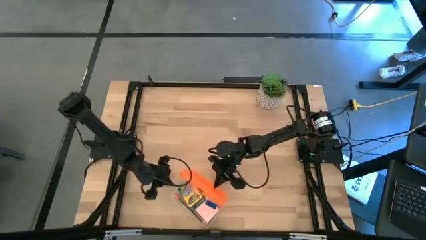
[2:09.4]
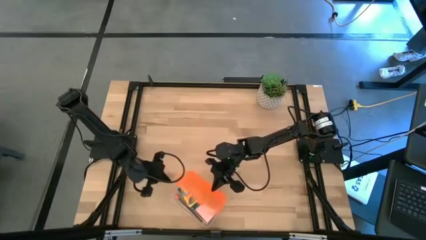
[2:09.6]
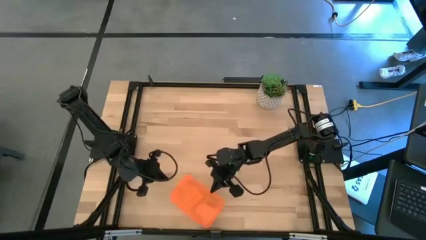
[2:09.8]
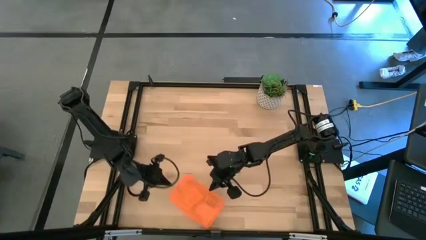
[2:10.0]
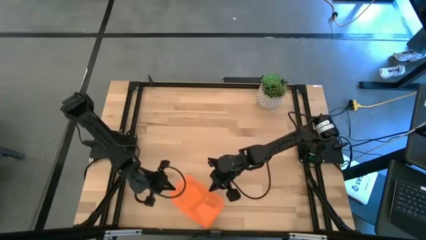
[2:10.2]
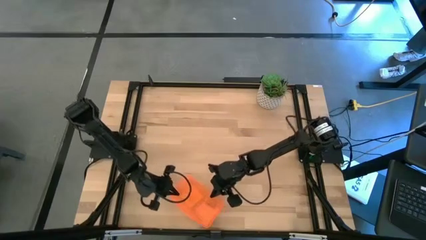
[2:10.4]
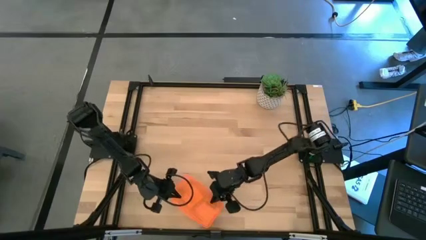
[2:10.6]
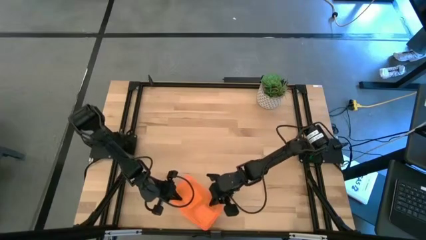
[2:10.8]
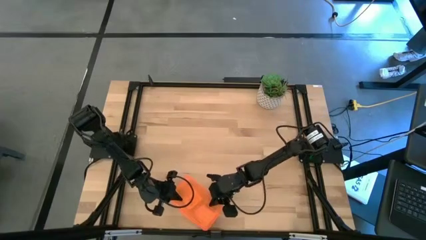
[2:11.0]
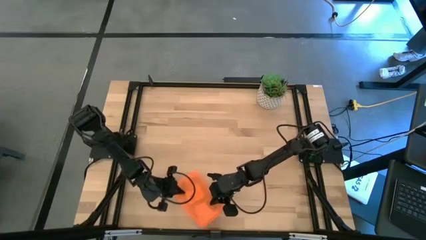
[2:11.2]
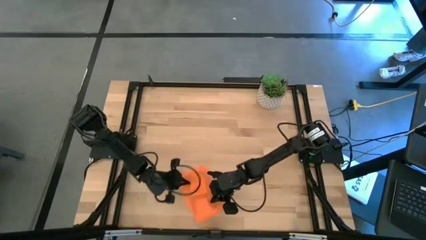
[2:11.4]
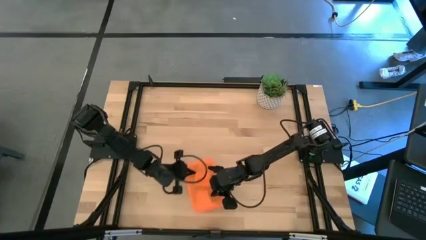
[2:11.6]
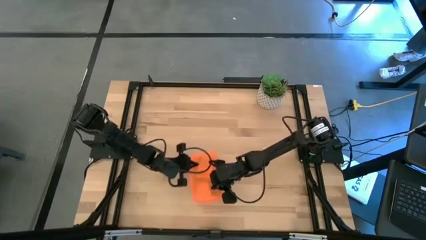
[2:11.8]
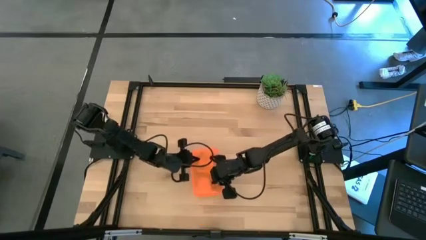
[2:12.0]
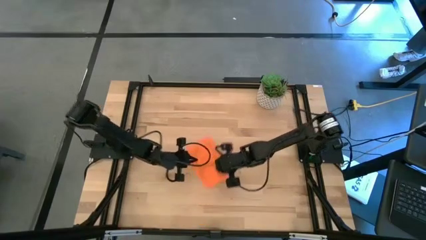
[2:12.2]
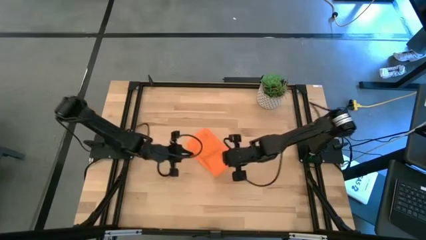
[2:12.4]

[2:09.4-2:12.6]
Task: Pack school essentials
Move the supply box to the center

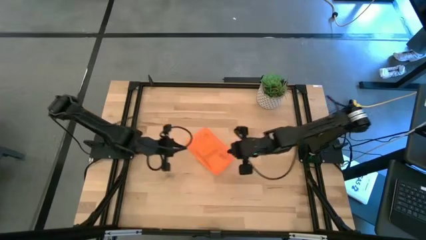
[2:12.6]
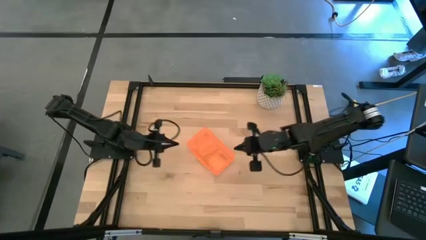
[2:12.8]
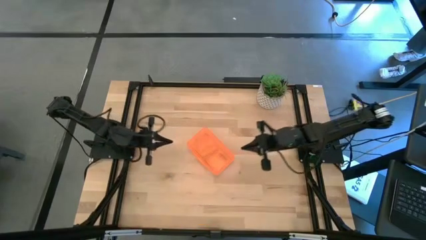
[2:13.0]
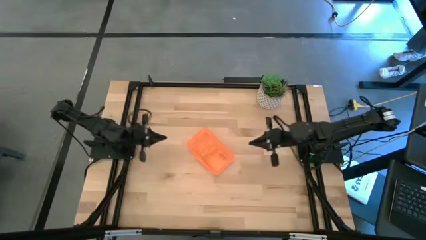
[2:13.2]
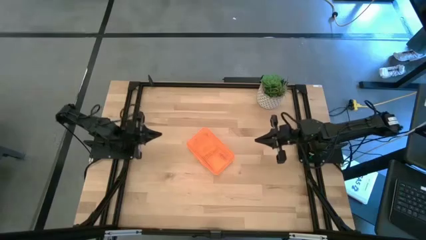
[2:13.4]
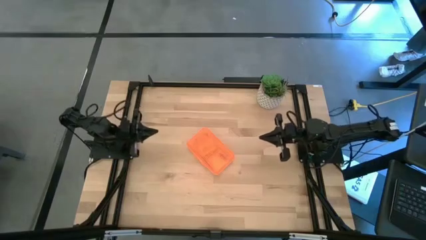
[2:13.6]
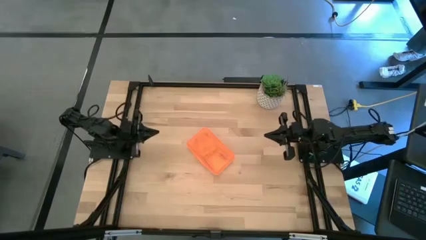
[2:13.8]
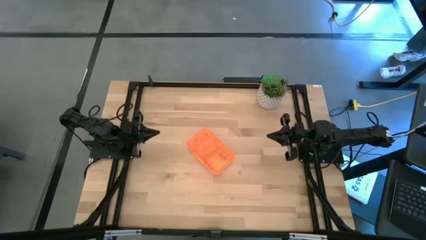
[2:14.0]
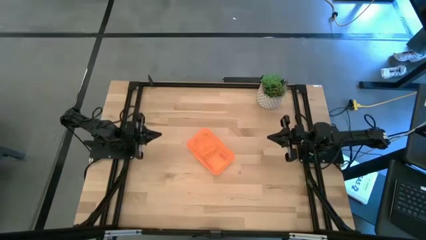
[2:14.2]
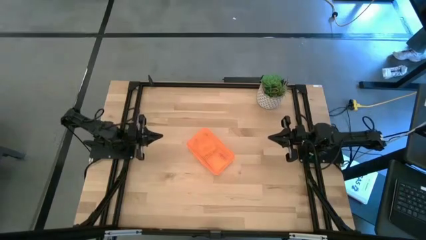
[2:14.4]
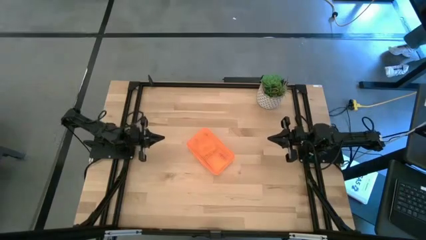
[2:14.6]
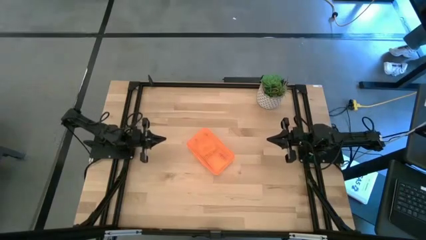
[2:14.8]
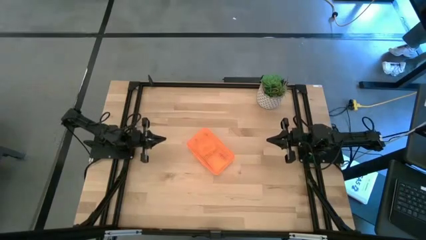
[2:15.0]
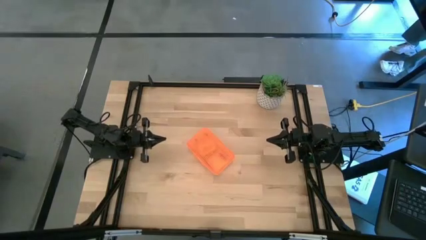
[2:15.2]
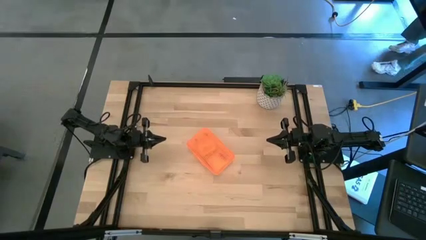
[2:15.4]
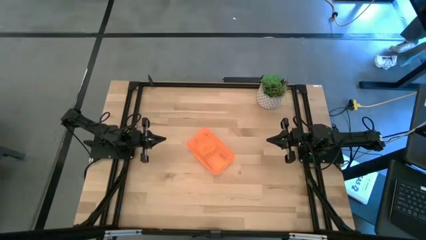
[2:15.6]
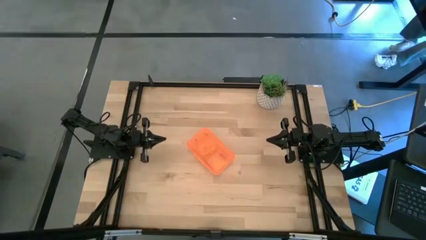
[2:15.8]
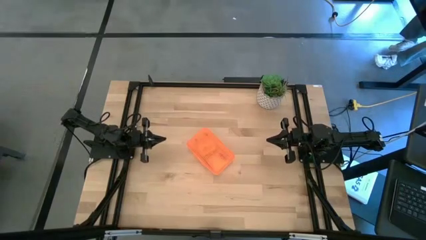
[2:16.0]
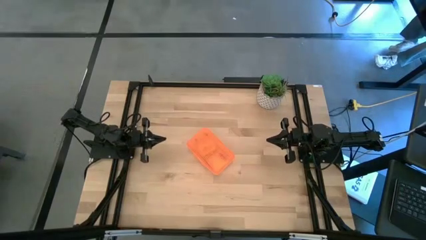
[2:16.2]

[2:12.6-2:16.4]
Return to Home Position

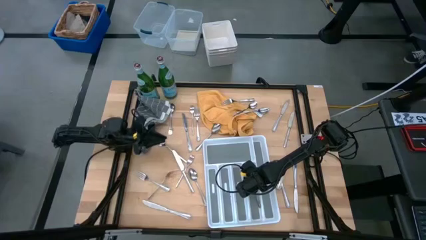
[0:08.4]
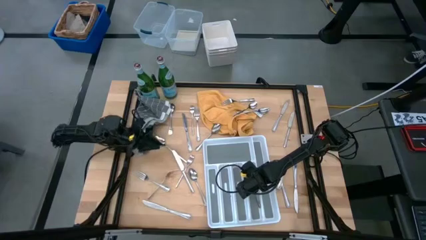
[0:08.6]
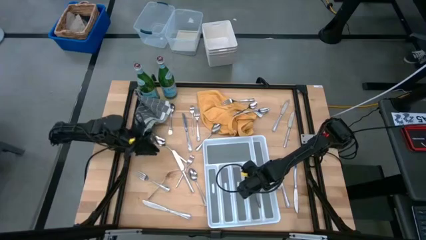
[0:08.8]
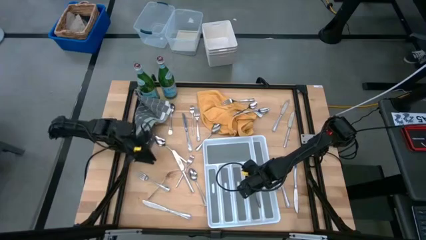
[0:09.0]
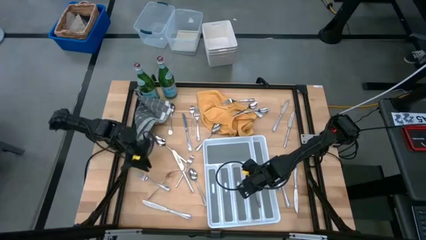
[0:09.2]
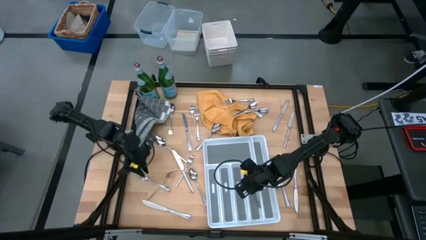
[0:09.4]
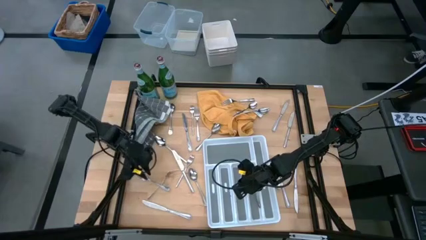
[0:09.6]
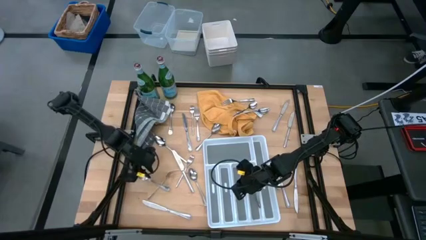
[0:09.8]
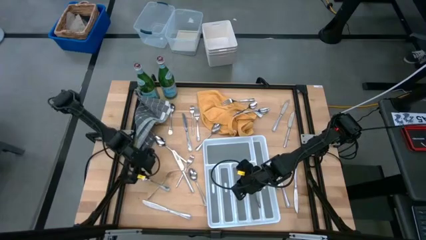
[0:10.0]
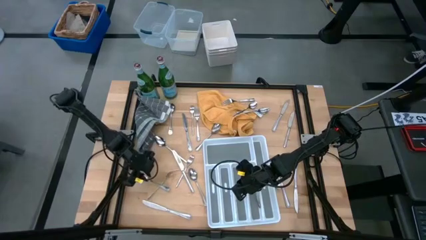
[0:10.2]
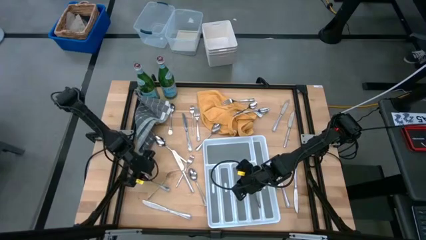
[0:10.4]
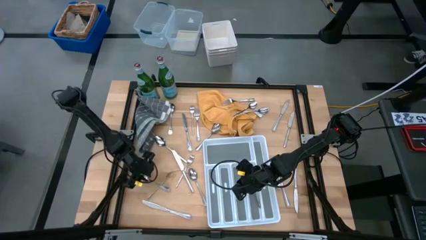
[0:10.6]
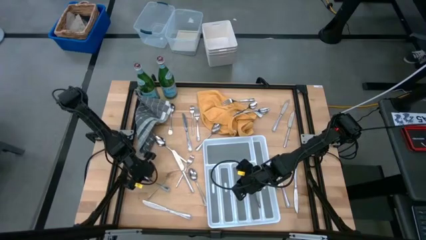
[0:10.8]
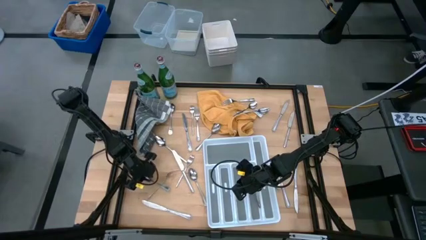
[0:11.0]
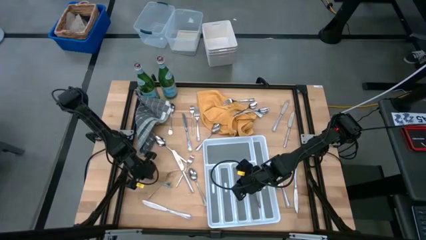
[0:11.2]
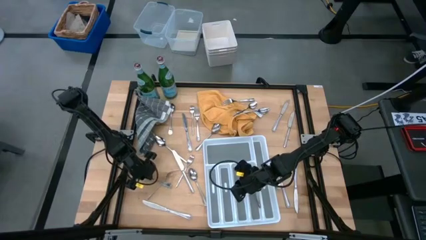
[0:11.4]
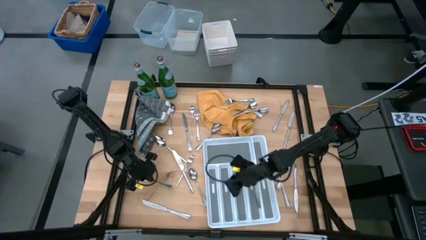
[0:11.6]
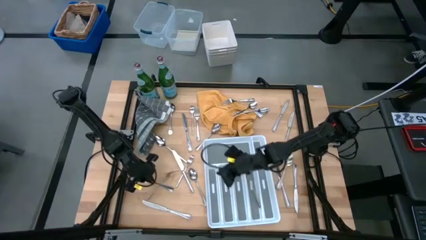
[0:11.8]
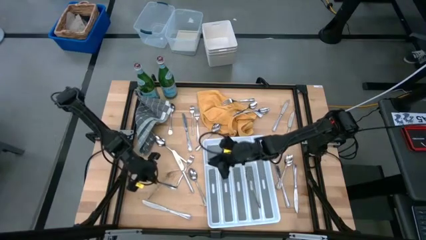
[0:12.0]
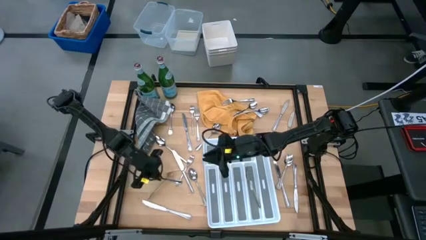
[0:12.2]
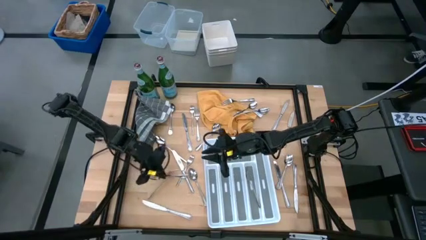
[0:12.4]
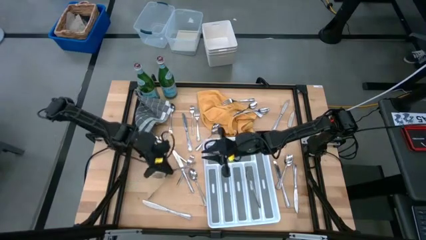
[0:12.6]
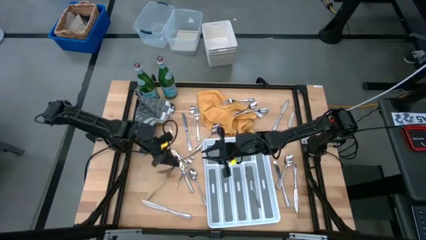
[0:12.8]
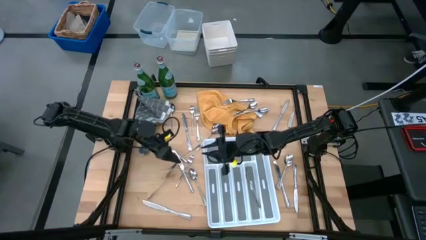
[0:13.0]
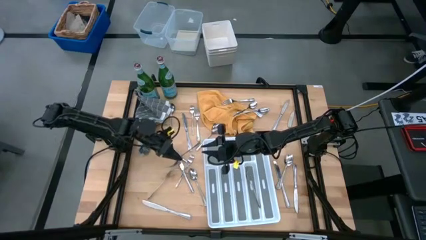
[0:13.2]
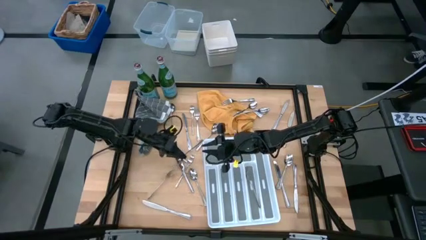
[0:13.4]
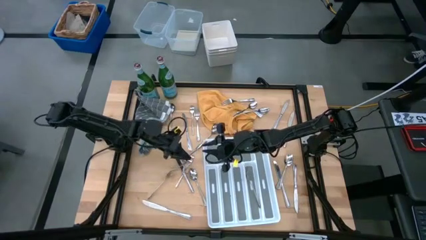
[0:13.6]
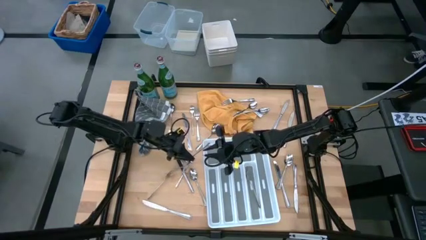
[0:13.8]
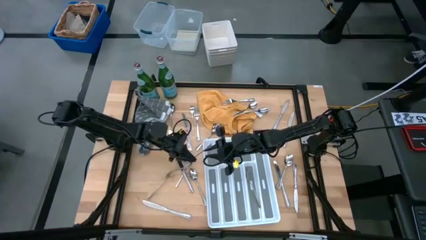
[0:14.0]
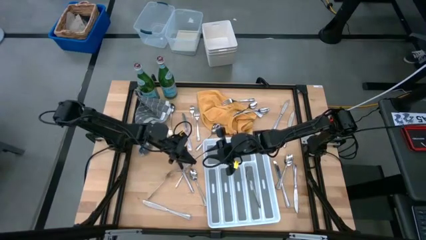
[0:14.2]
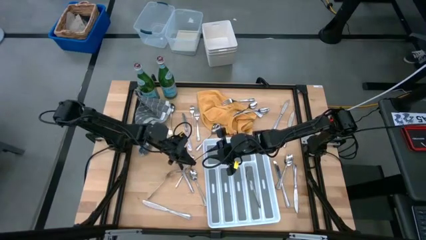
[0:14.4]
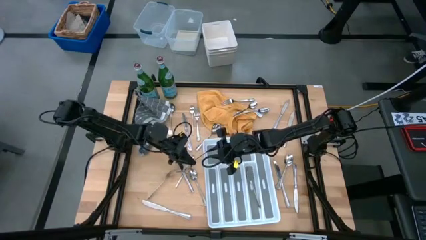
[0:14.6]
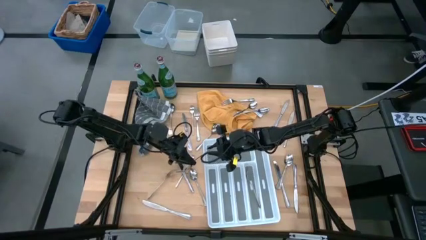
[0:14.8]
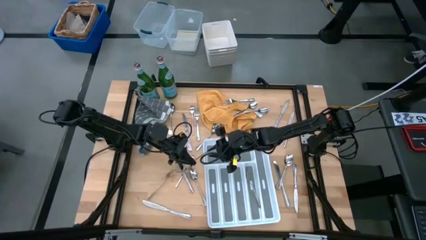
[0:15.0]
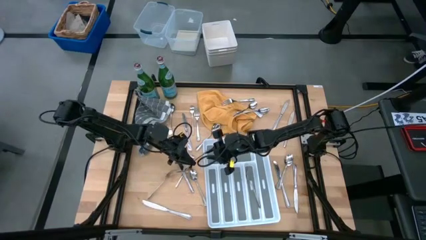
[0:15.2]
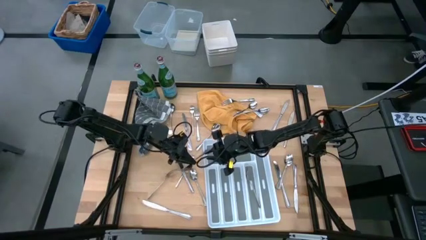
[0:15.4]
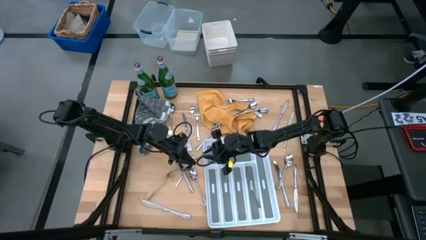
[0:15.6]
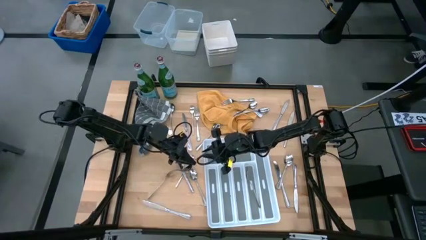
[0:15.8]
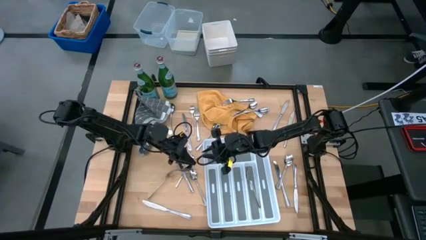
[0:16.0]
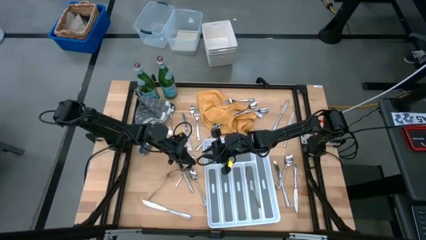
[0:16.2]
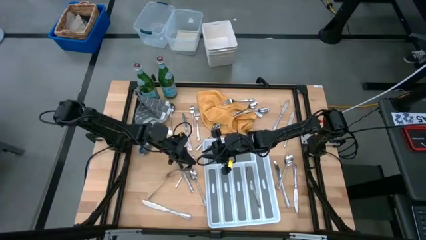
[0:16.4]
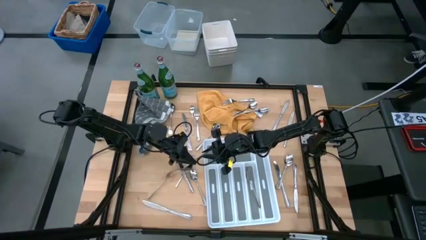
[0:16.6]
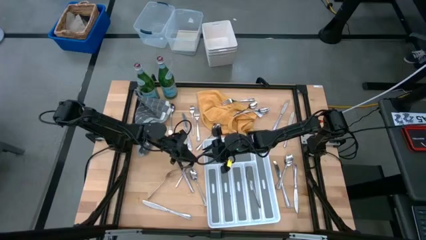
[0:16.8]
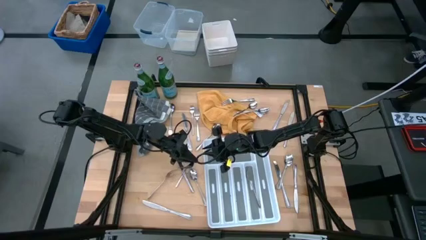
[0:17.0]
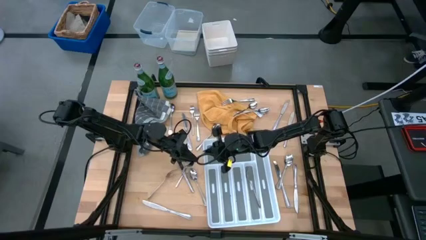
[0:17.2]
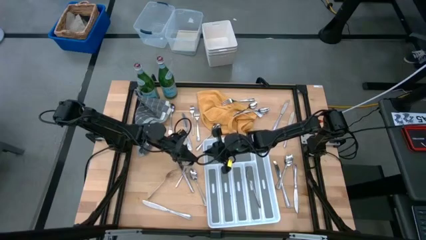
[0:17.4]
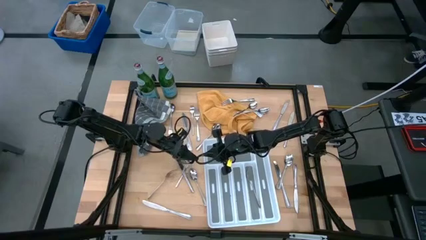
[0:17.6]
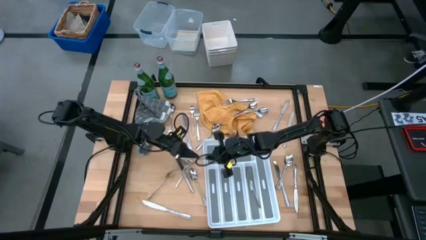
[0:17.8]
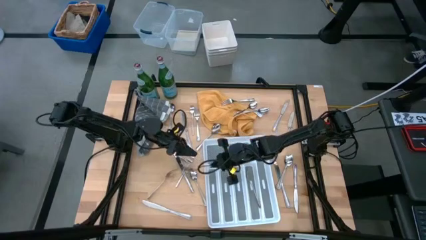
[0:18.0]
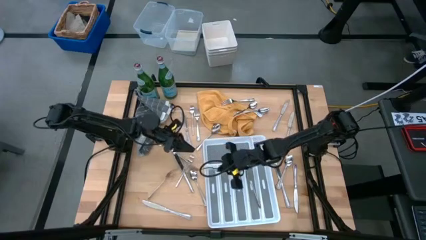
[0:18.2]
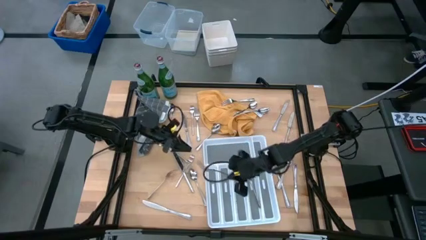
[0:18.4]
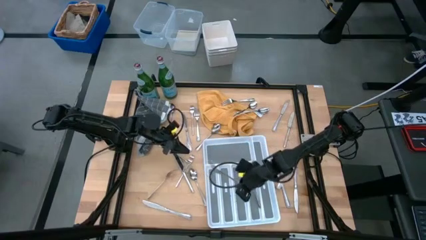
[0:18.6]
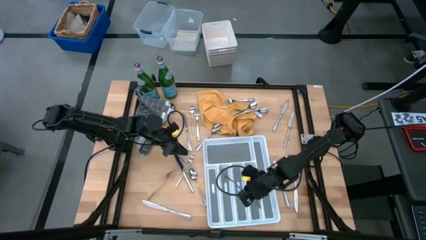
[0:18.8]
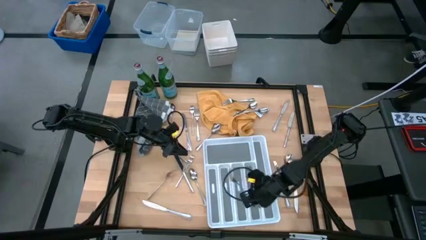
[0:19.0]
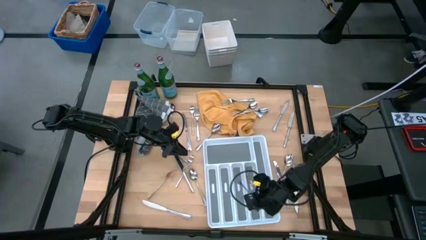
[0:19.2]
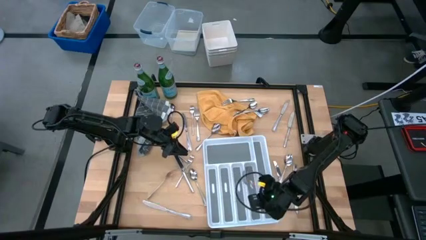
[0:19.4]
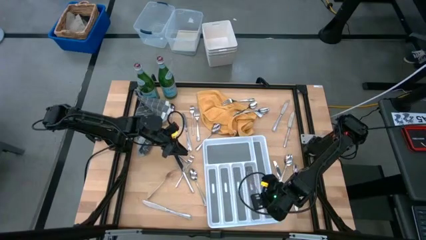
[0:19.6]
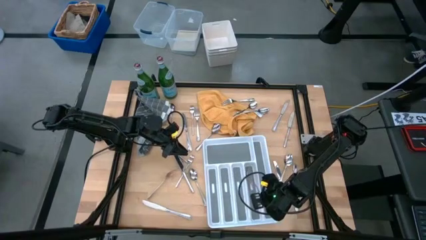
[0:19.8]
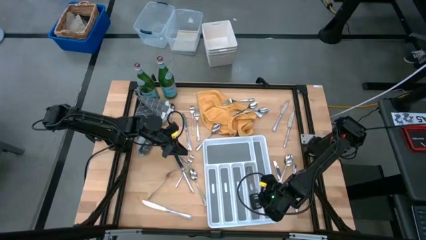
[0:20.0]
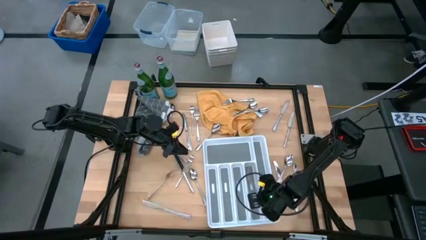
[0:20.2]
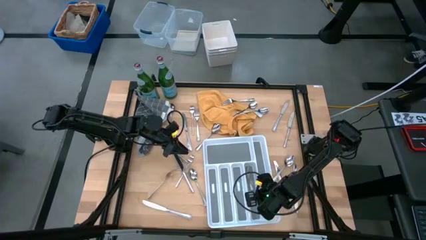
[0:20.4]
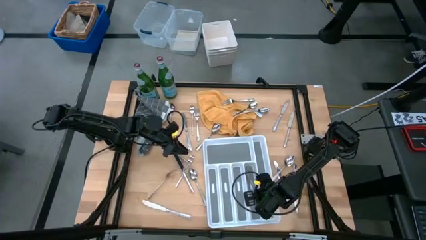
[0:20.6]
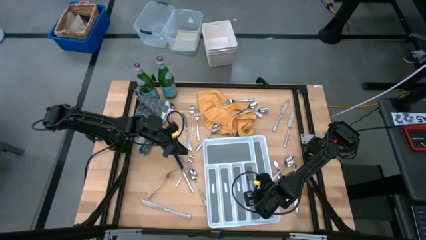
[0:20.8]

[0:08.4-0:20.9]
Task: Sort silverware
Put the fork into the silverware tray
